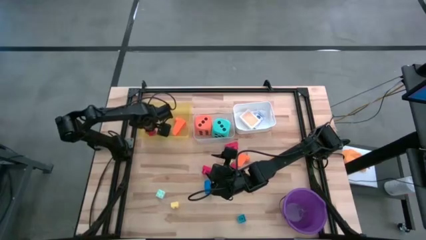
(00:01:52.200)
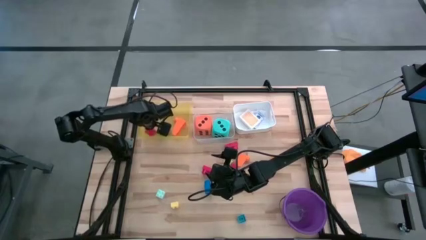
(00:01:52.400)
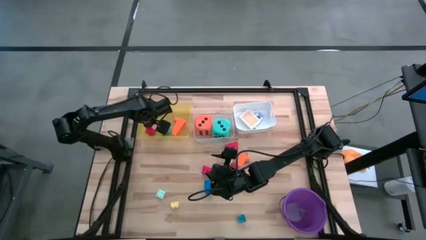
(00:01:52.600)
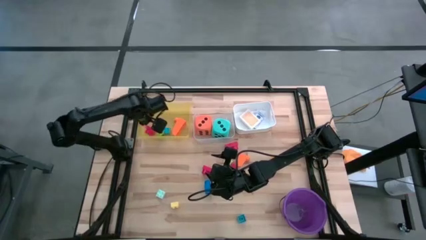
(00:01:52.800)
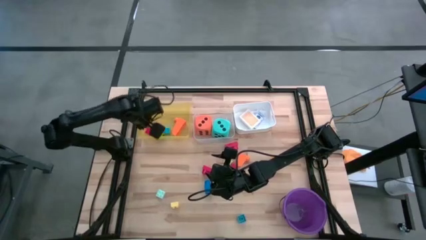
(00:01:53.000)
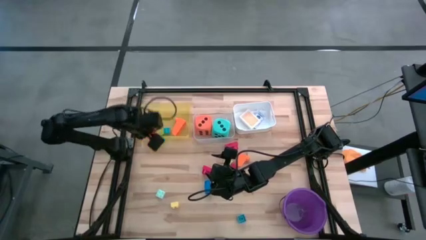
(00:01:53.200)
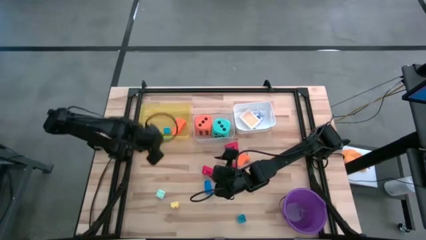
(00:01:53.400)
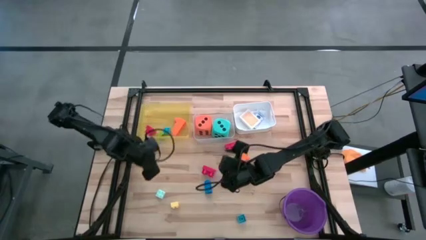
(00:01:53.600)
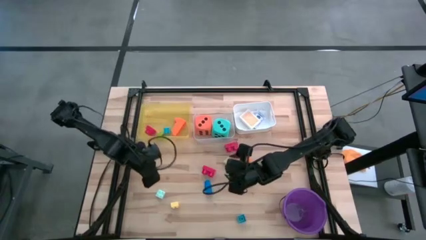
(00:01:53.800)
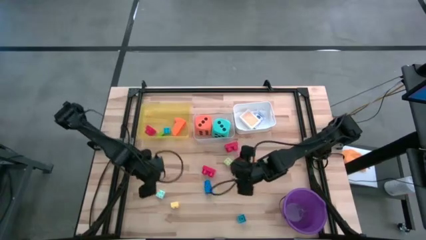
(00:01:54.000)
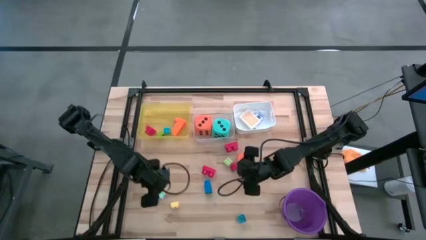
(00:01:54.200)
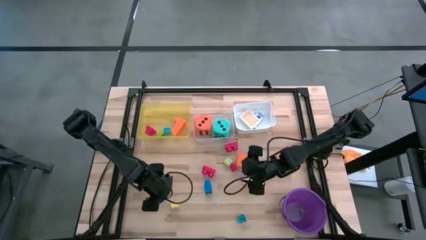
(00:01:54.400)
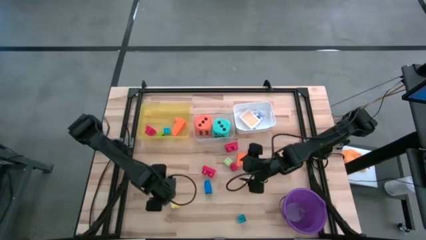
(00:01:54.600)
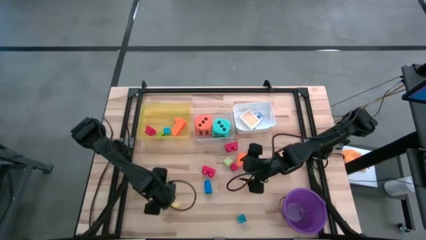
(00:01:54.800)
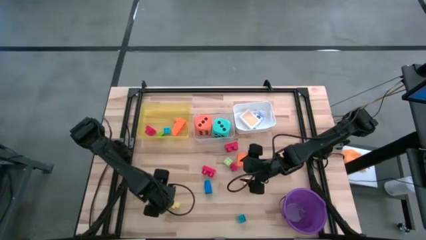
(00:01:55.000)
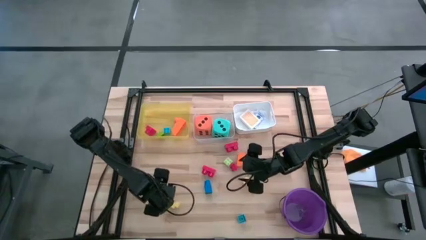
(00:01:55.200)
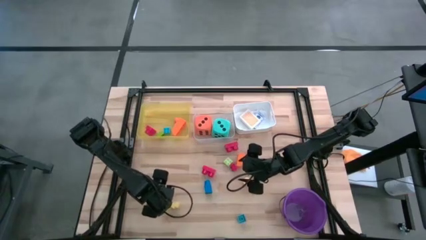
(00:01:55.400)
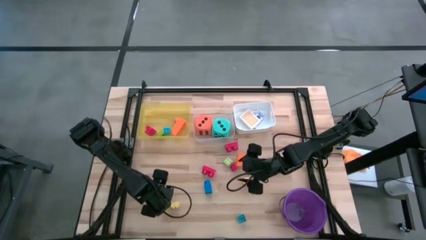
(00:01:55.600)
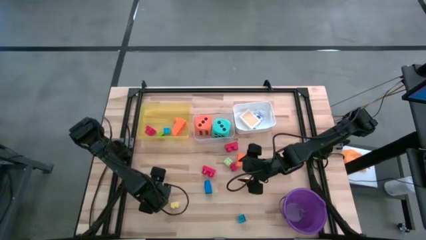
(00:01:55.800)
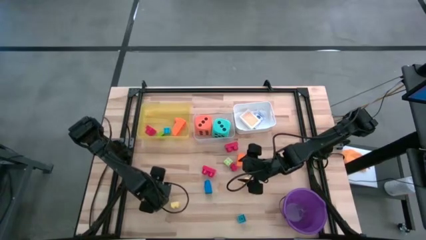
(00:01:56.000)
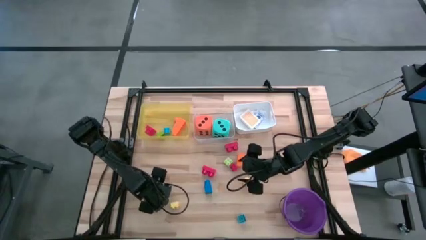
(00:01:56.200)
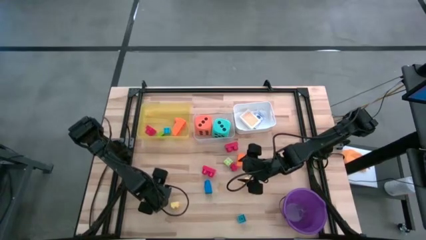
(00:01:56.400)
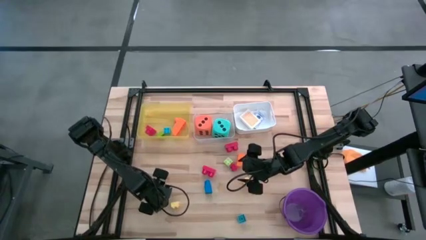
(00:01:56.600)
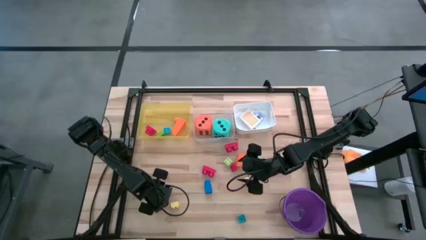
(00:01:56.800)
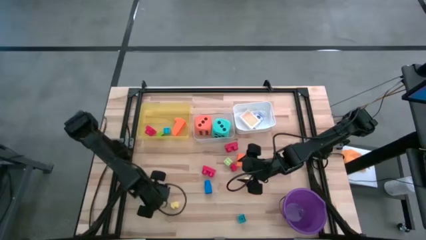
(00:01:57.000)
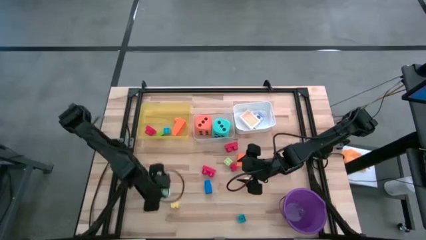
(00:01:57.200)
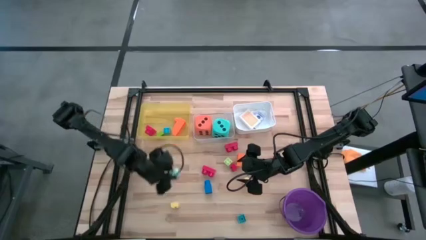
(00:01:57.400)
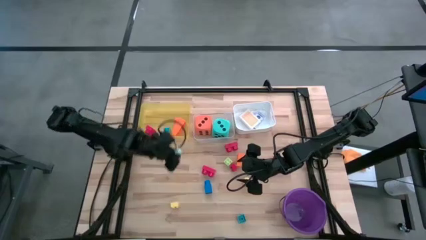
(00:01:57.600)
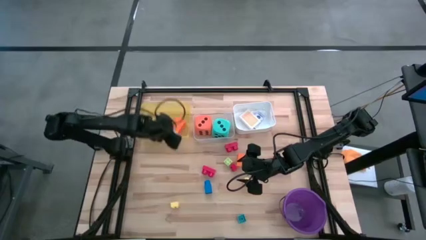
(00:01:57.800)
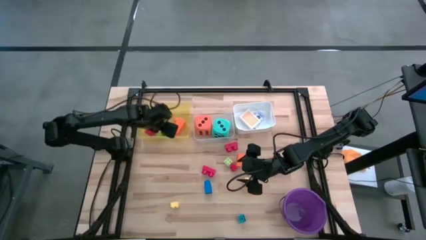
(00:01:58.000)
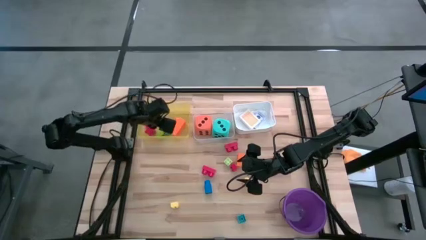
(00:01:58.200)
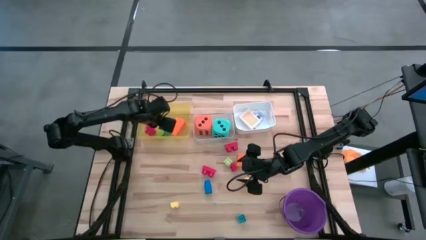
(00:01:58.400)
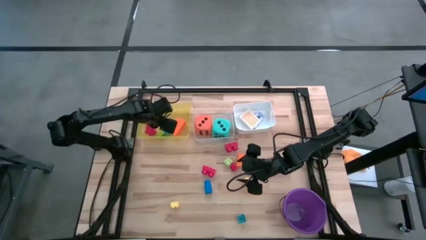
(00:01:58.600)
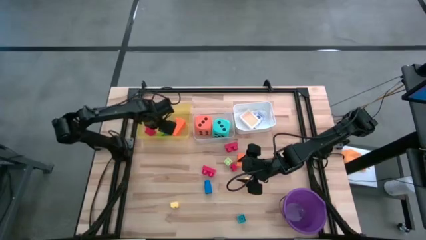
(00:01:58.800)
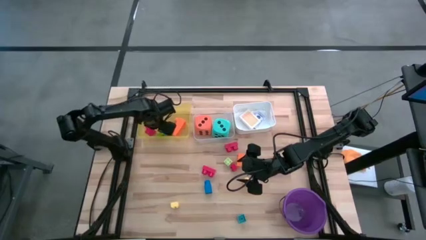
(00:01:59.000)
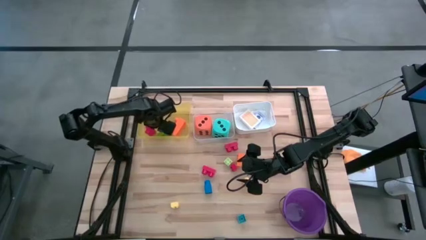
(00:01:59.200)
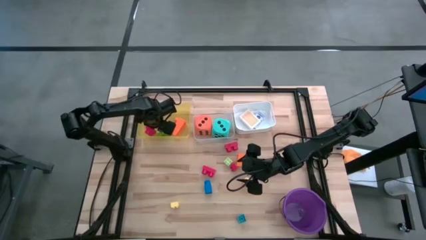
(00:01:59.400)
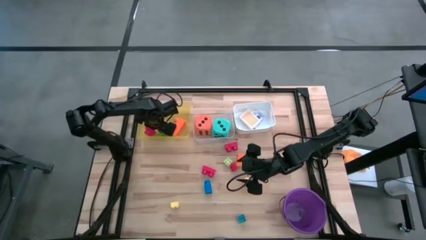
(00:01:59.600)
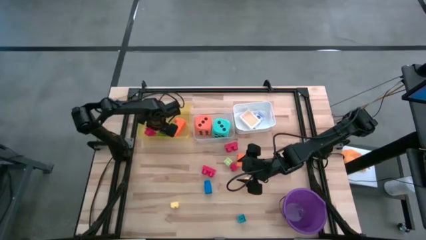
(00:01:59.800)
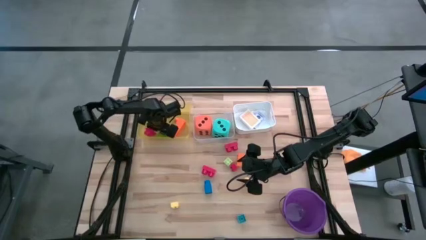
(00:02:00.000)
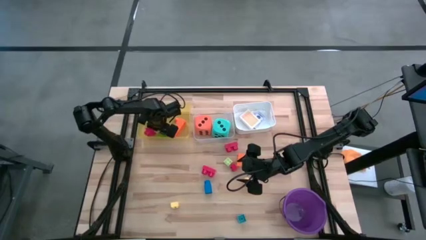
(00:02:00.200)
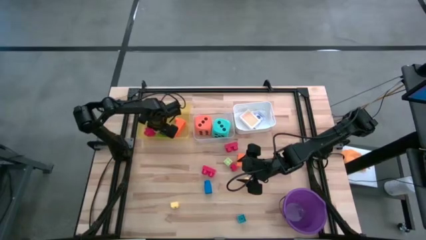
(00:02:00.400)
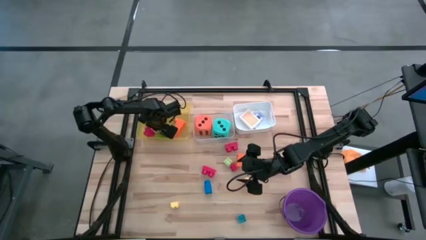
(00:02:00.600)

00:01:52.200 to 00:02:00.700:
Task: Pick & Place Toys
Put the light blue game piece into the yellow bin

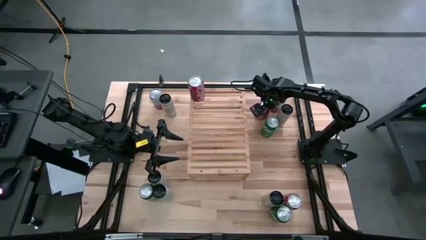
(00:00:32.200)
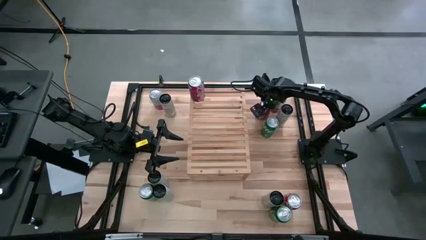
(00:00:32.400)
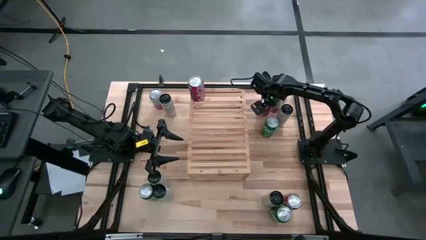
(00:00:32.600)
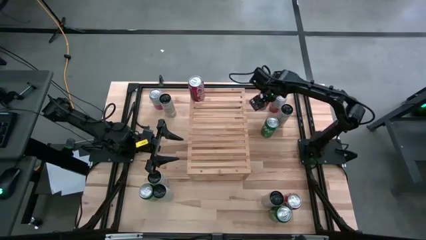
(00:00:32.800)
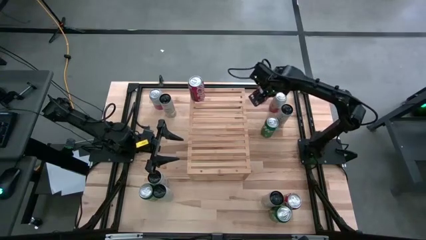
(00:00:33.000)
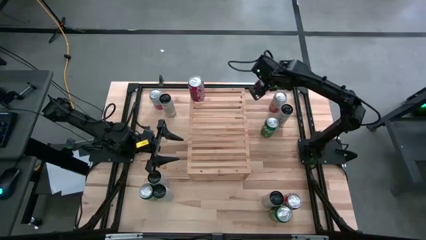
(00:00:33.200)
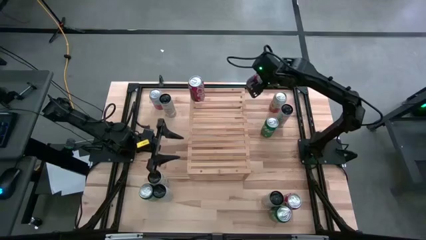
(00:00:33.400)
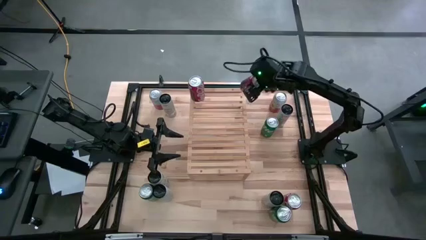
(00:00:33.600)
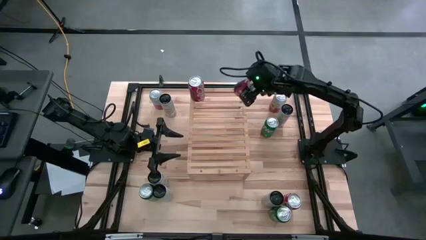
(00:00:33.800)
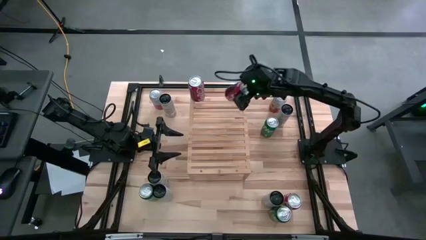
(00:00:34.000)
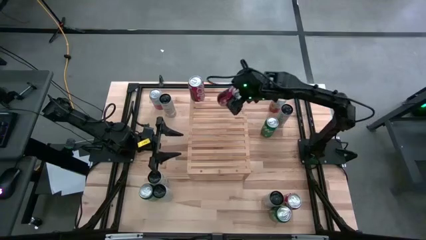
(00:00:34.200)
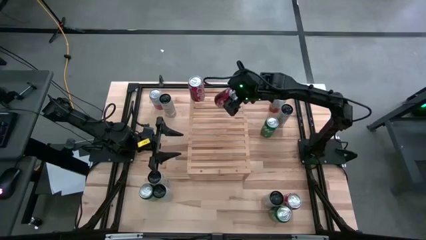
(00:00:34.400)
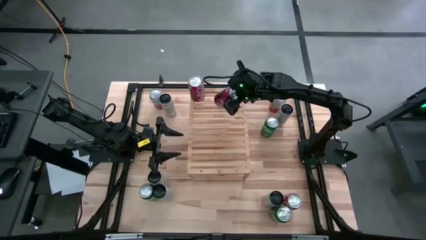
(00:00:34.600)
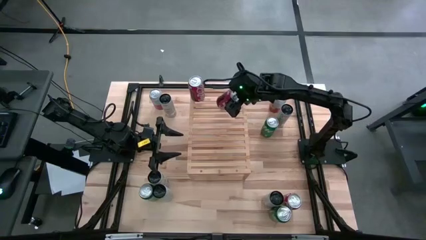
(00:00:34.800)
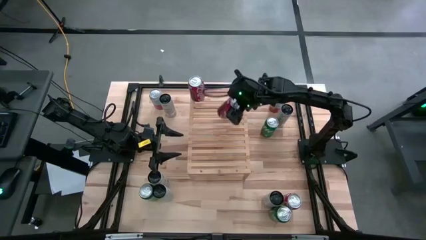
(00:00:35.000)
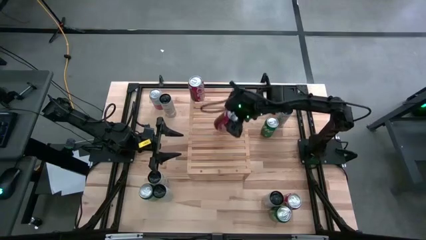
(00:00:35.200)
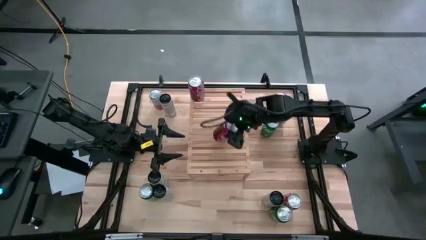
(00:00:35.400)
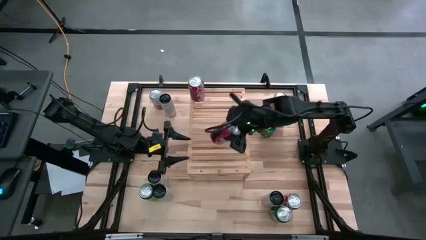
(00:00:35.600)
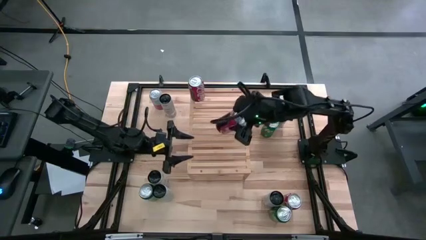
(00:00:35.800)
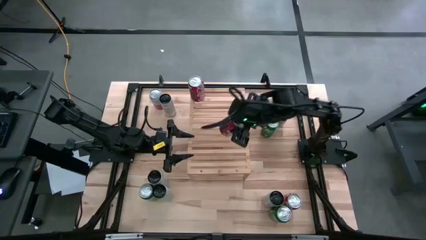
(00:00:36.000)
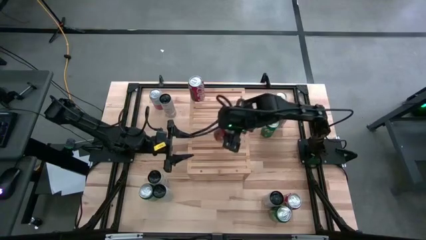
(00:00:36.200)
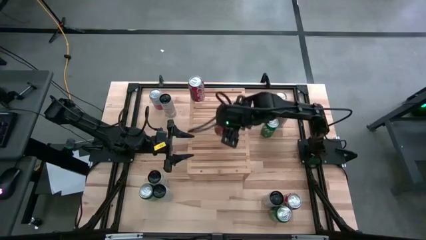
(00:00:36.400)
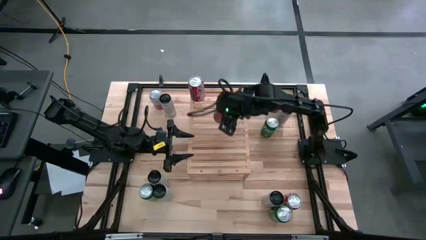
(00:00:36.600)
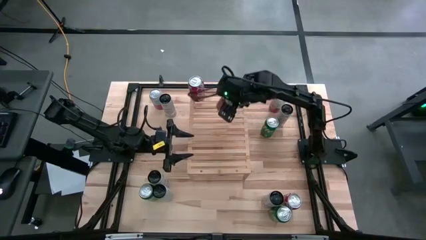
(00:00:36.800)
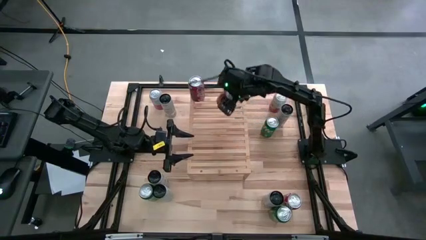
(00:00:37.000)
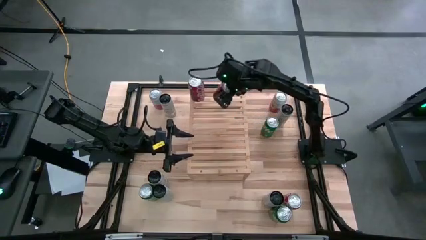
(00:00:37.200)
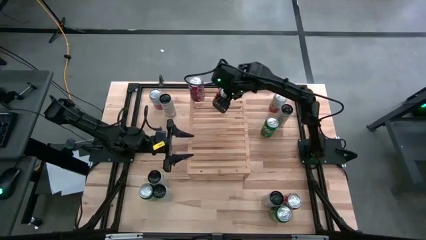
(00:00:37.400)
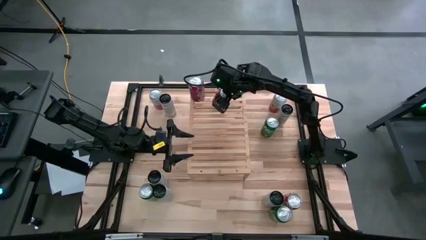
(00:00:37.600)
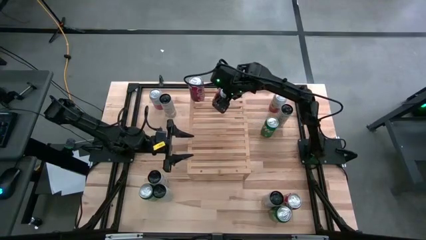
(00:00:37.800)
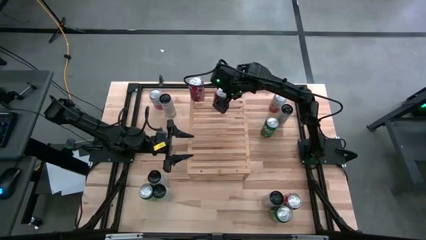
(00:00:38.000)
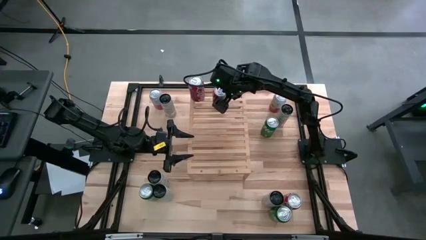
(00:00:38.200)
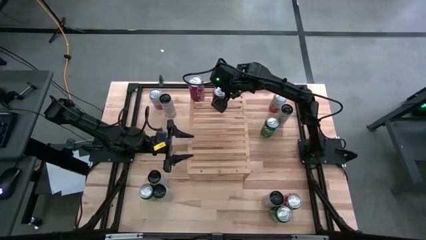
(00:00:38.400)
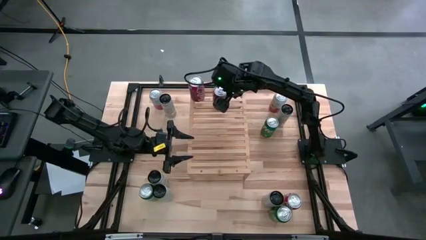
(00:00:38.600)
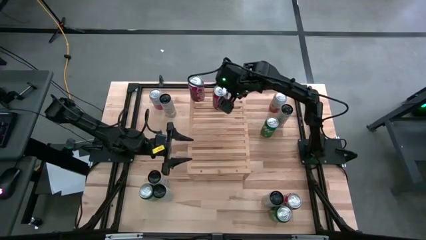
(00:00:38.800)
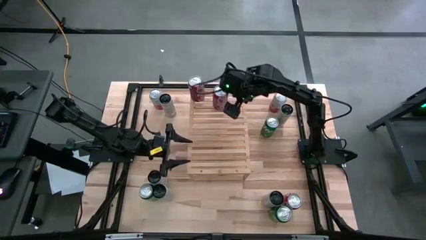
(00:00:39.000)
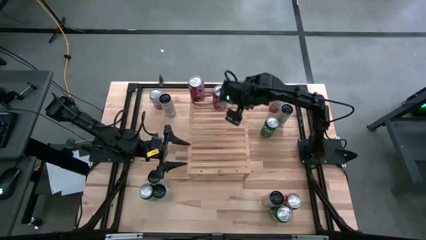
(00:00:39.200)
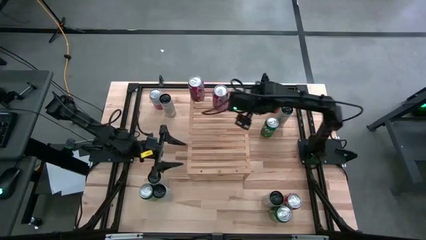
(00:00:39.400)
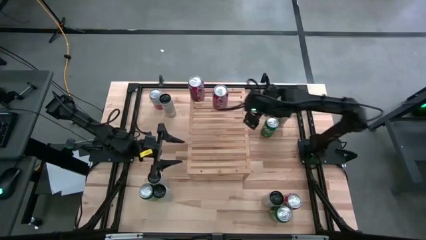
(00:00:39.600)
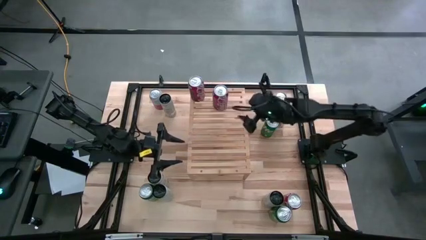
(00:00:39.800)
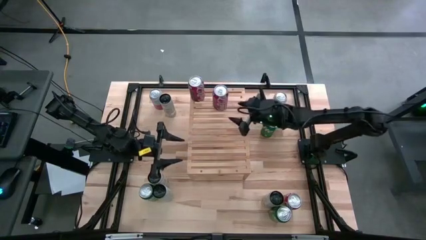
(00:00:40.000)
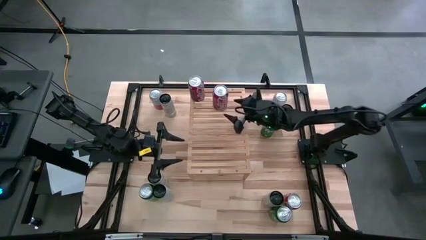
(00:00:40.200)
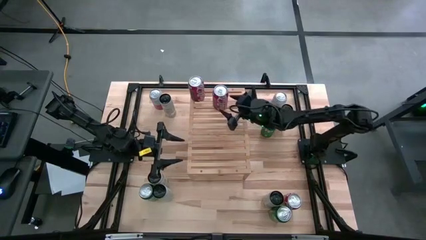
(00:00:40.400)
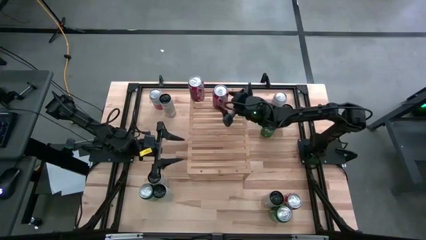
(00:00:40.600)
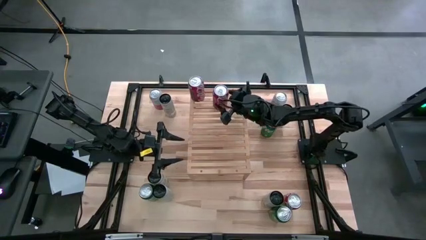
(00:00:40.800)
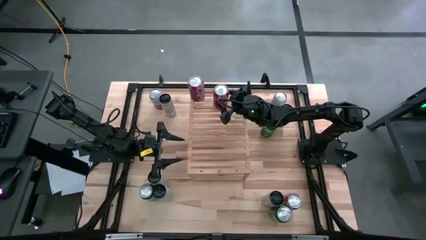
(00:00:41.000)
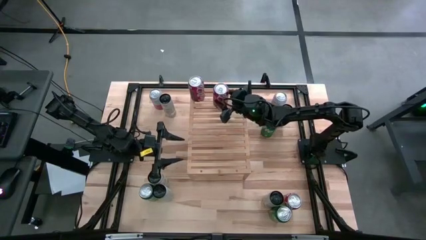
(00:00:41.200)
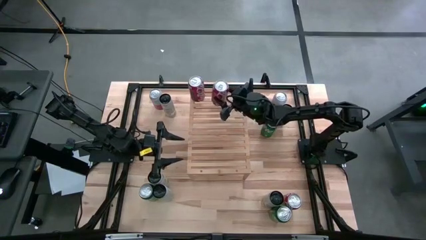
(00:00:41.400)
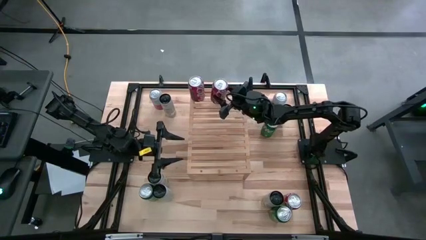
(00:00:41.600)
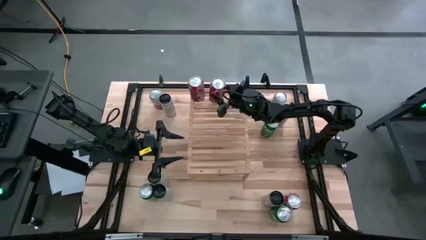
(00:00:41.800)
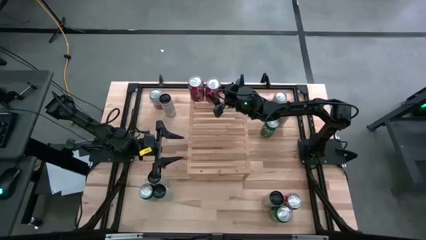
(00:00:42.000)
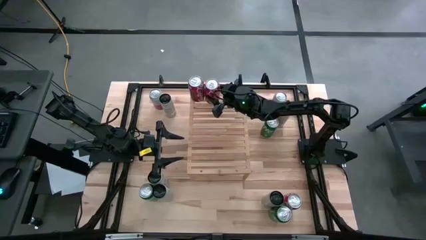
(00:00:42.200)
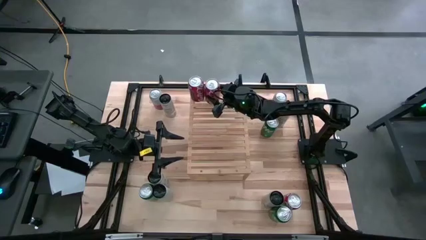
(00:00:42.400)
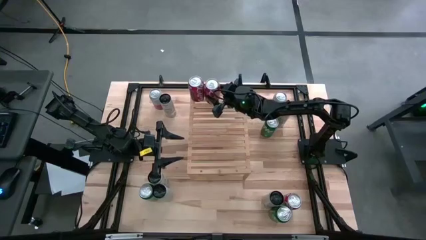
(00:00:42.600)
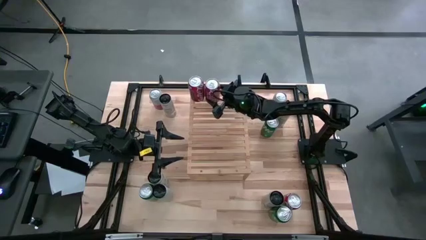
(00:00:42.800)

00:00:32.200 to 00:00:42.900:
Task: Place canned beverage on shelf
Align the top right coke soda can with the other coke soda can on the shelf
